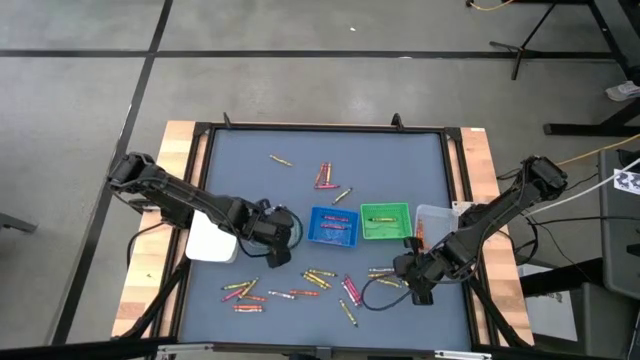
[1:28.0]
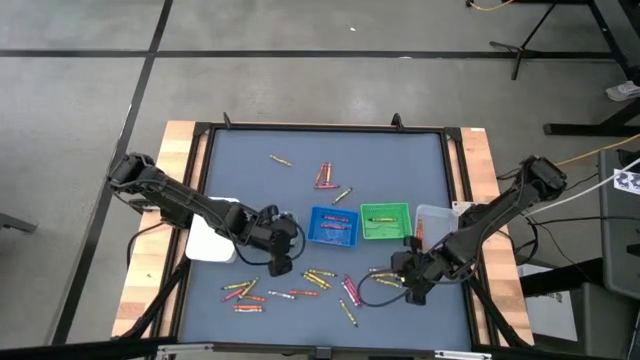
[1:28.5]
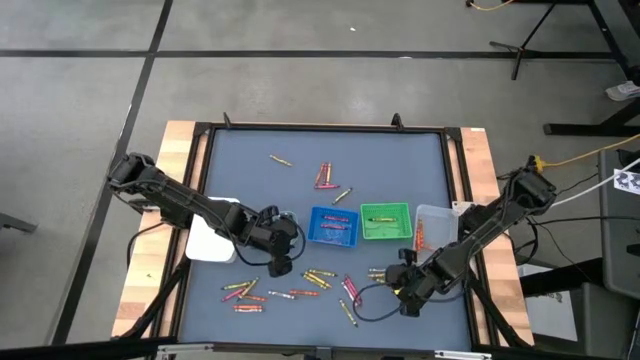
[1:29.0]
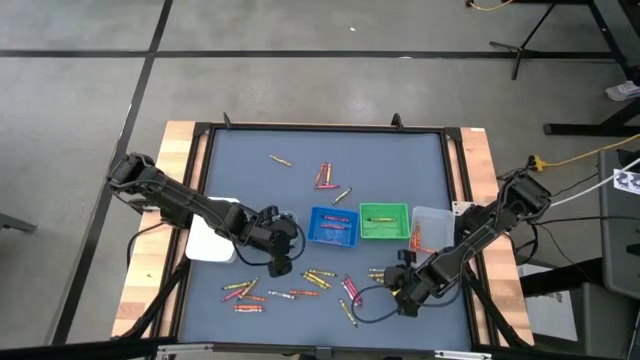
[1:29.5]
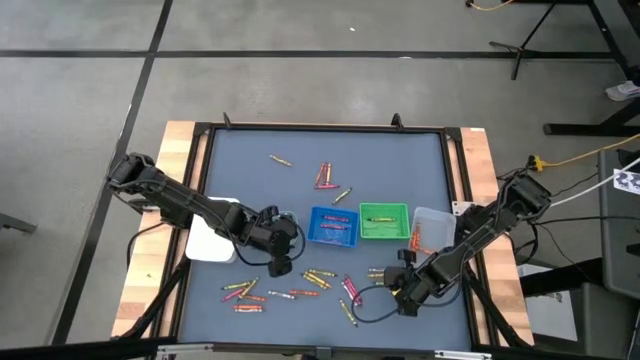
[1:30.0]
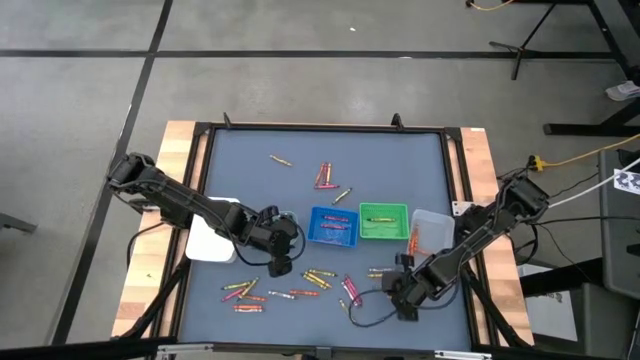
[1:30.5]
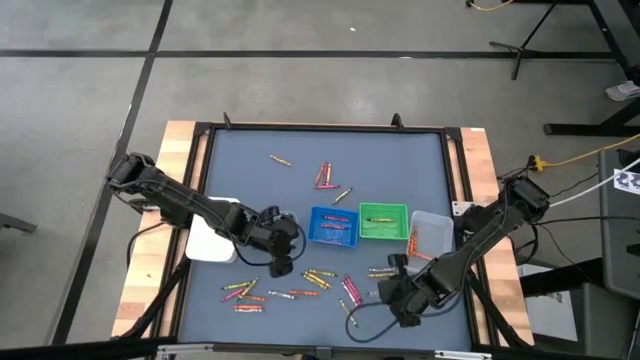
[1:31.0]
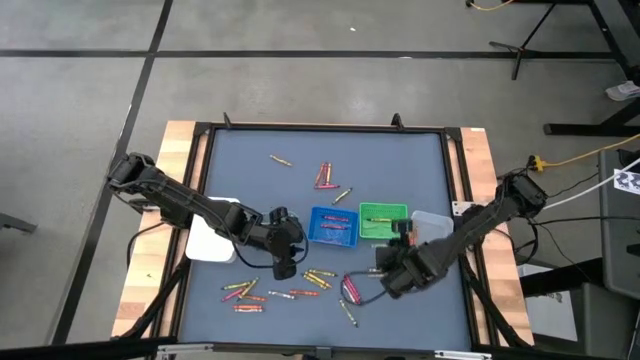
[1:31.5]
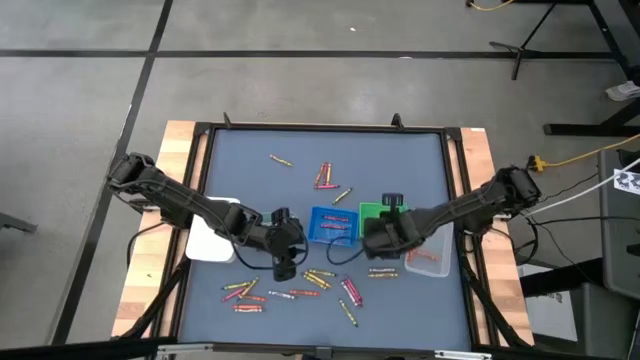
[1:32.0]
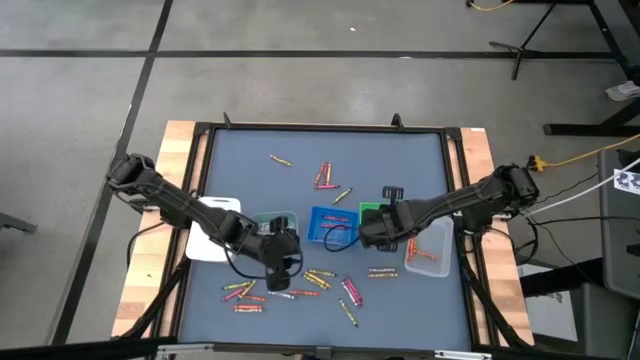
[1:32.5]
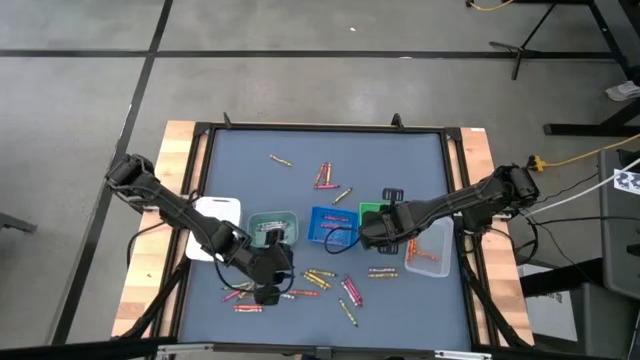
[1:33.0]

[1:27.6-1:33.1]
Task: Sort crayons
Put the green crayon into the green bin

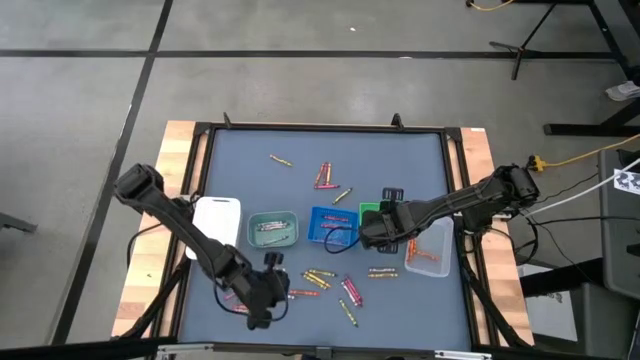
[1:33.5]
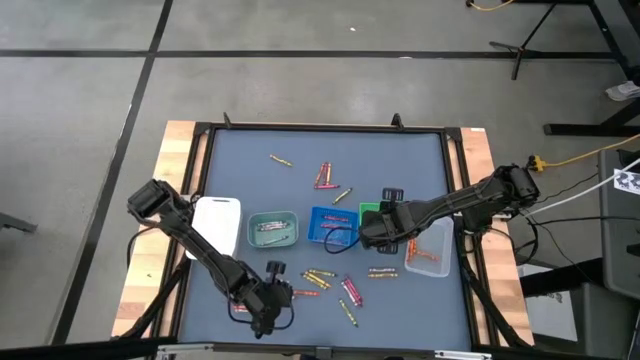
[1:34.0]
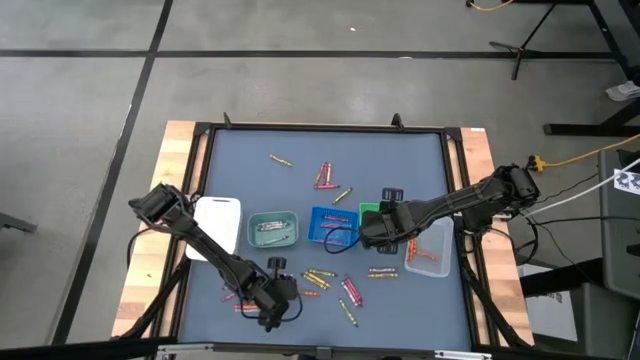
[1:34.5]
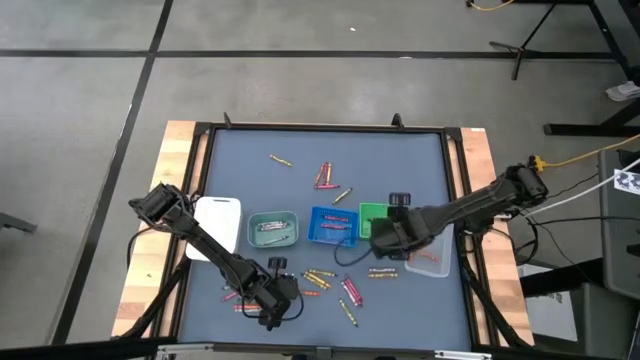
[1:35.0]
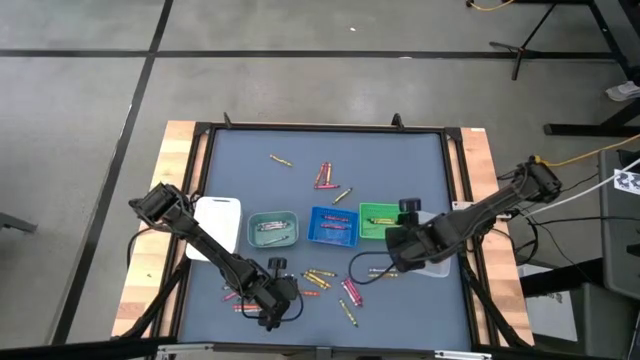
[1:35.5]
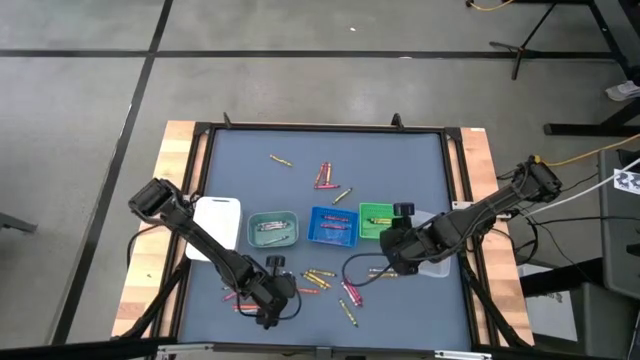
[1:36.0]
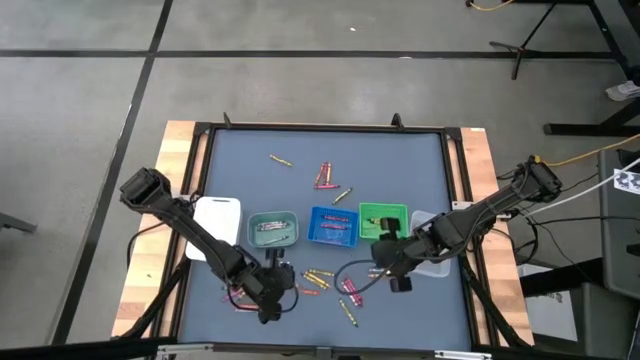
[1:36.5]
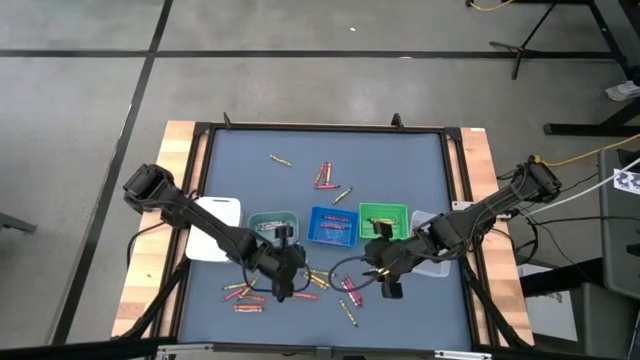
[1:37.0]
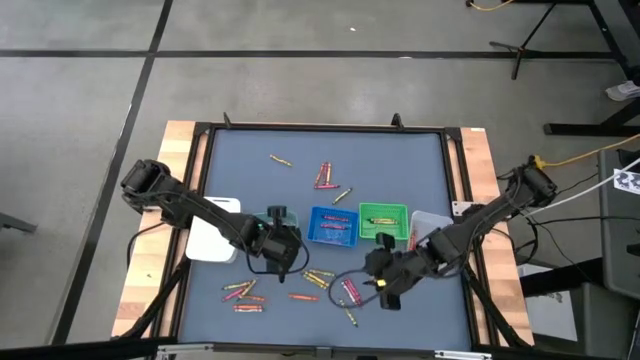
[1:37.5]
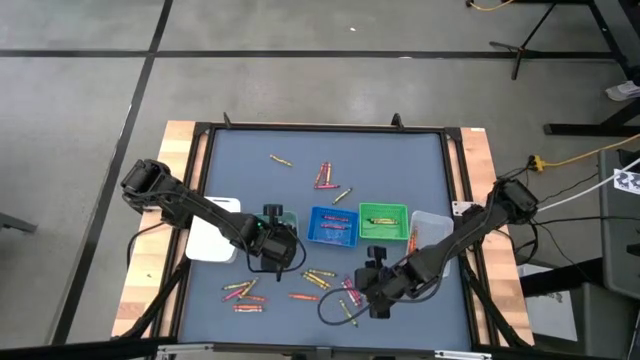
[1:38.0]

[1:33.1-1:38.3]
Put the gray crayon into the light green bin

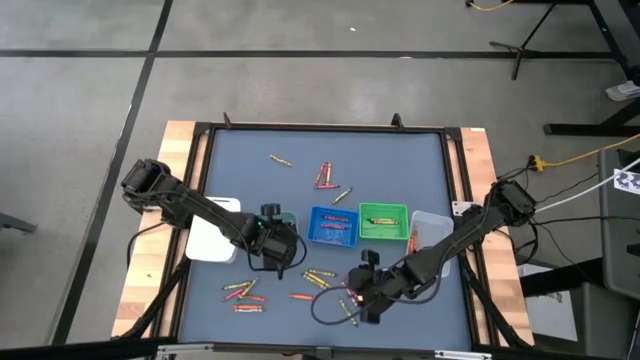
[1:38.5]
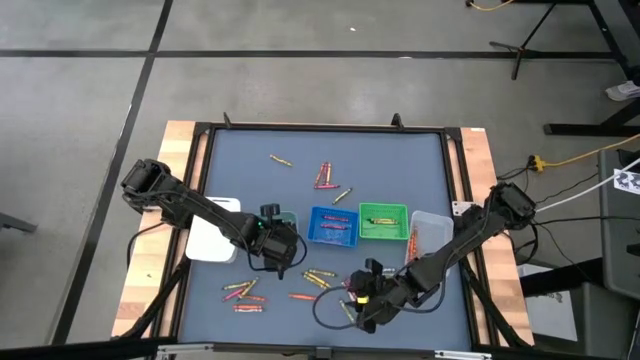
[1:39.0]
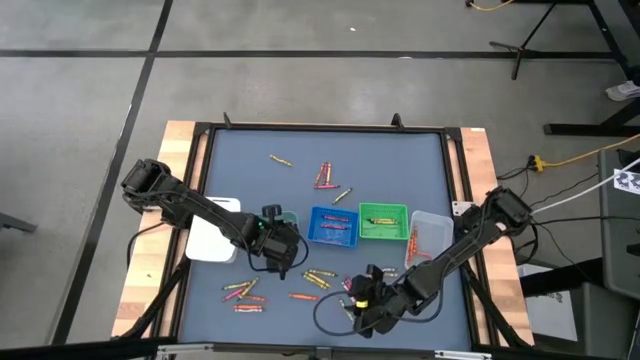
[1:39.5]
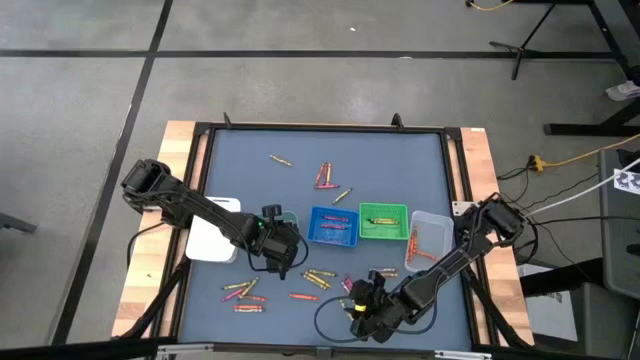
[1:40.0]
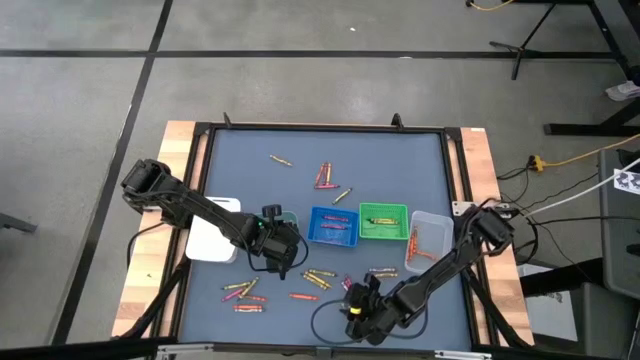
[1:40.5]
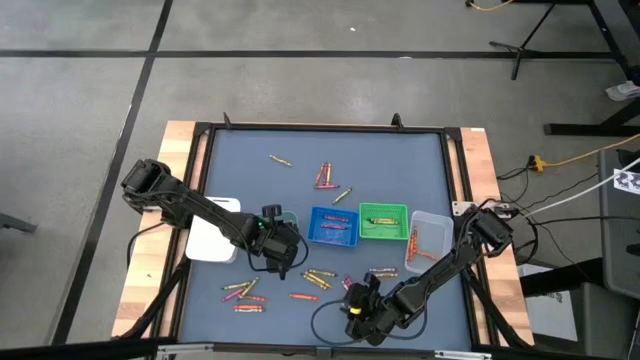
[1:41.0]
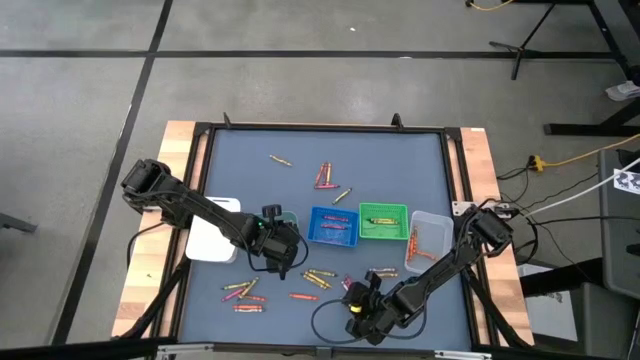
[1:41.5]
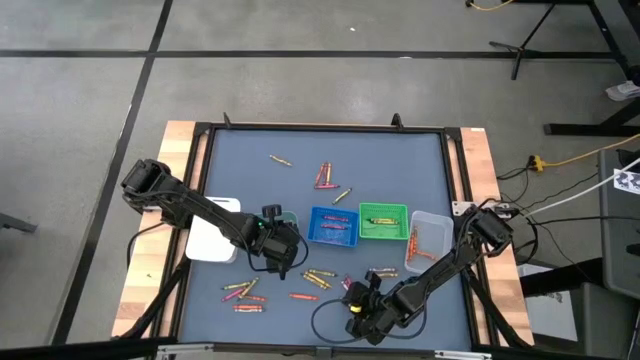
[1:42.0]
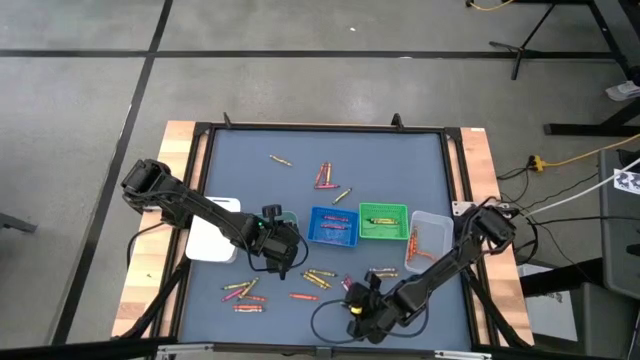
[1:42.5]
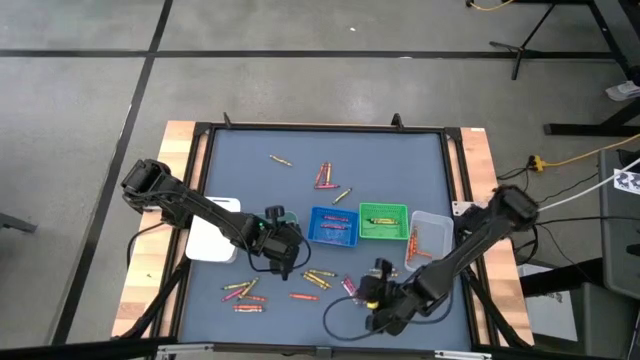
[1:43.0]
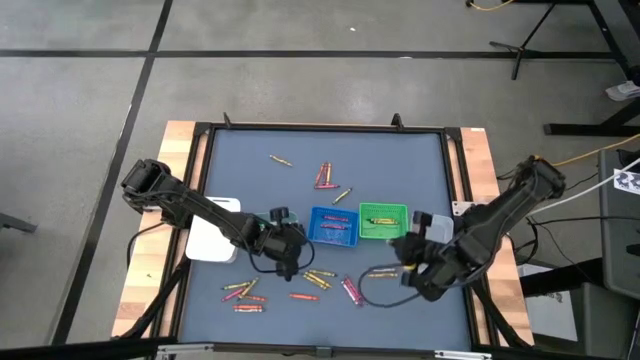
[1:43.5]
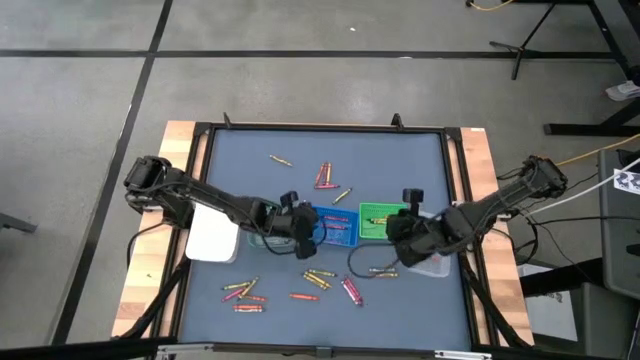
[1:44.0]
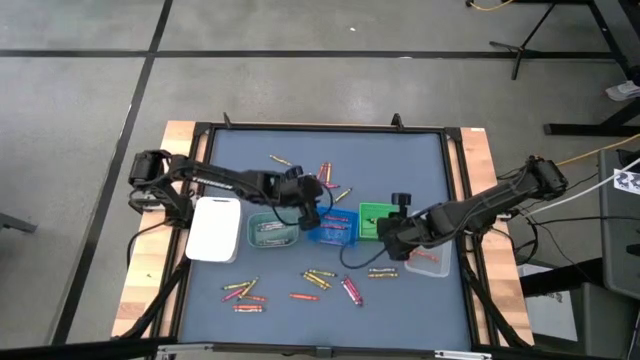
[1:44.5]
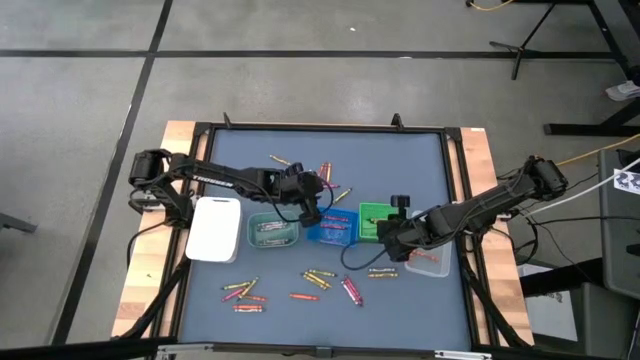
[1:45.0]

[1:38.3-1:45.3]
Put the green crayon into the green bin

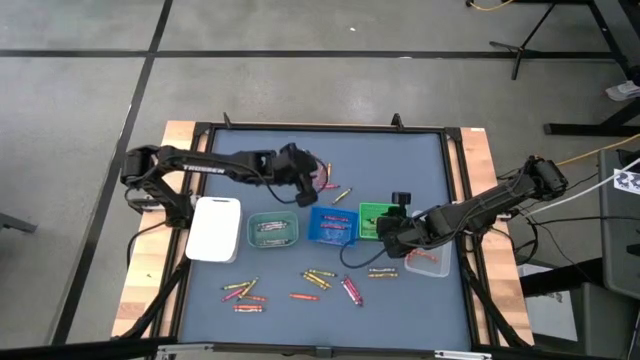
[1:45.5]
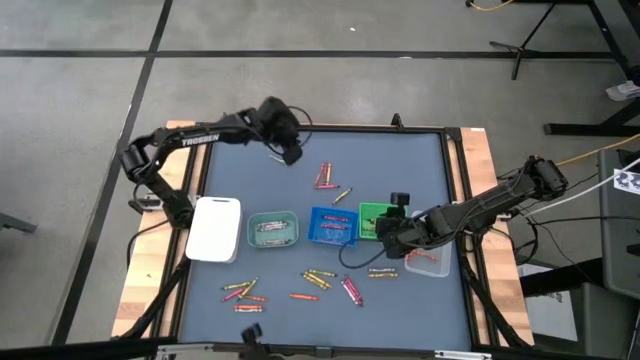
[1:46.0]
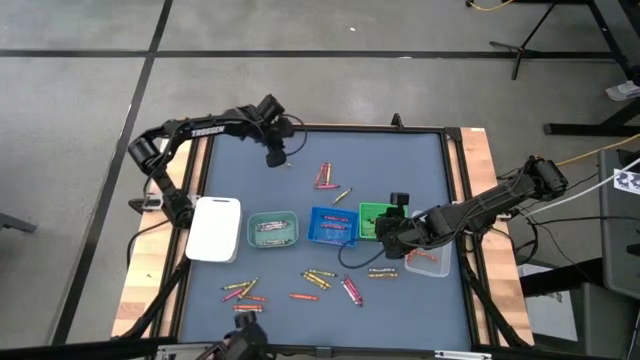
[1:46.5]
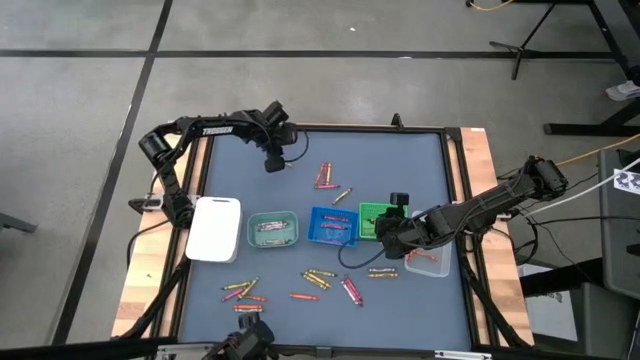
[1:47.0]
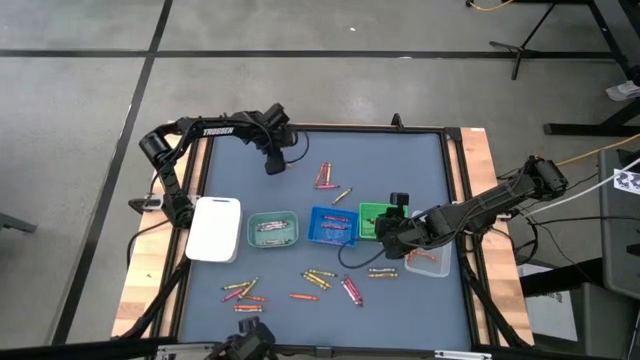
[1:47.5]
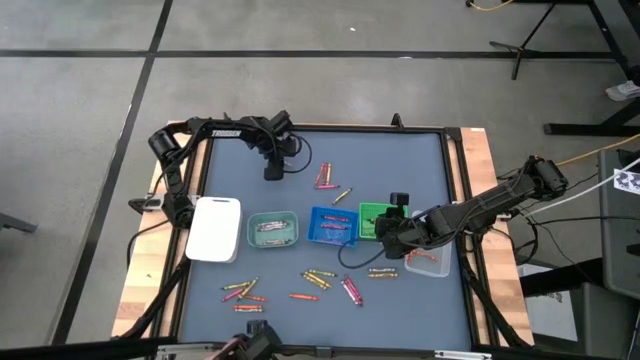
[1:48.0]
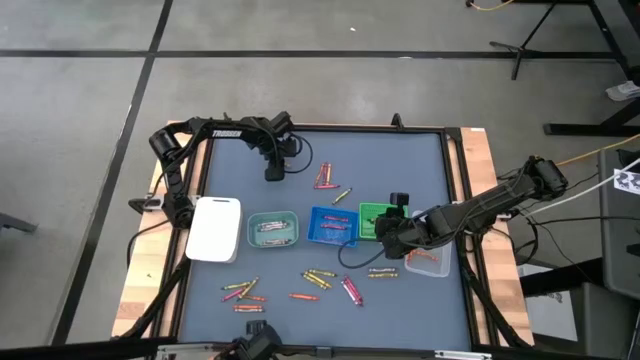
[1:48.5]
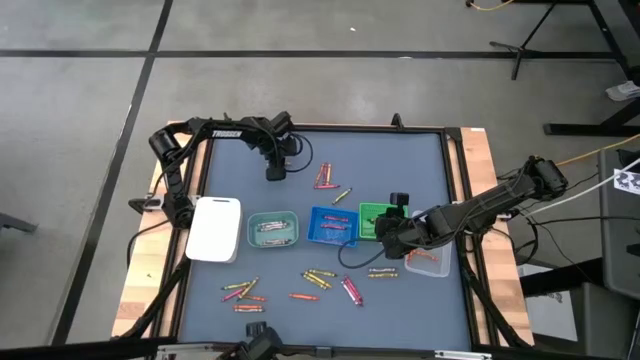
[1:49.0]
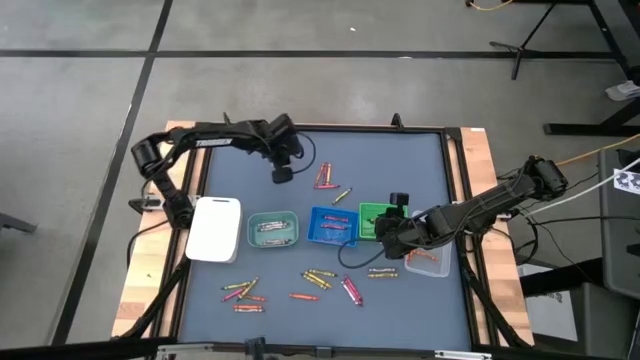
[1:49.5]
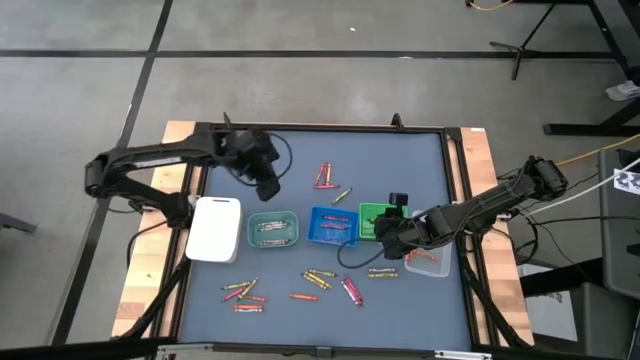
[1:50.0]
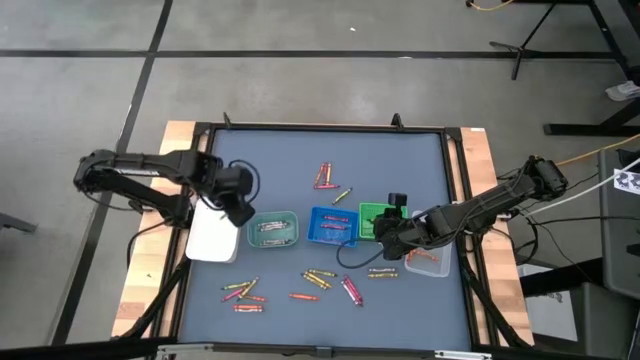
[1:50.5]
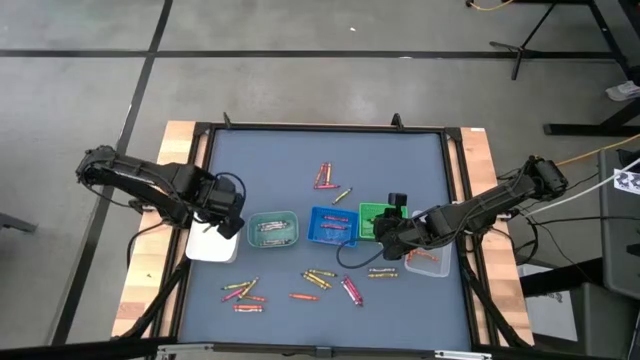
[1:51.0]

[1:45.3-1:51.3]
Put the yellow crayon into the white bin
